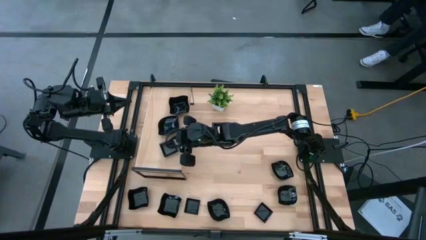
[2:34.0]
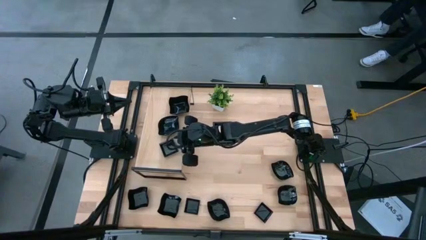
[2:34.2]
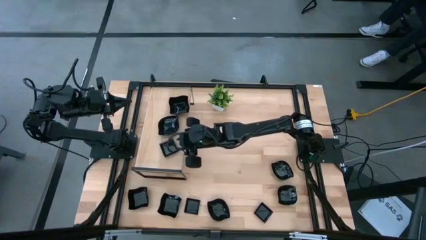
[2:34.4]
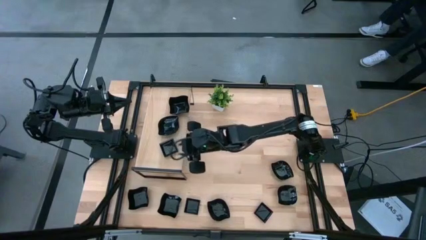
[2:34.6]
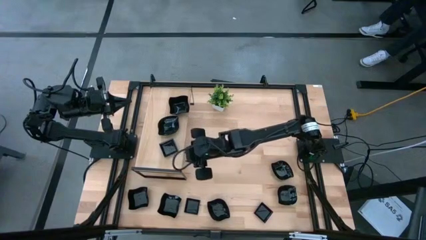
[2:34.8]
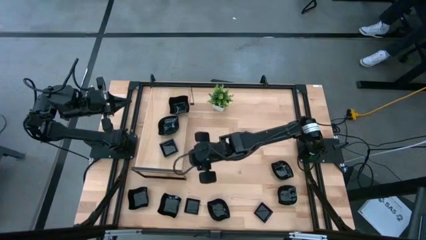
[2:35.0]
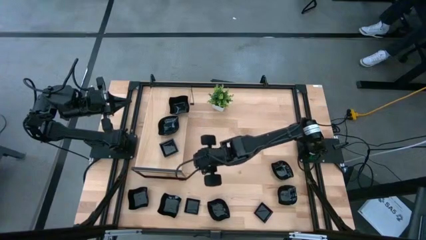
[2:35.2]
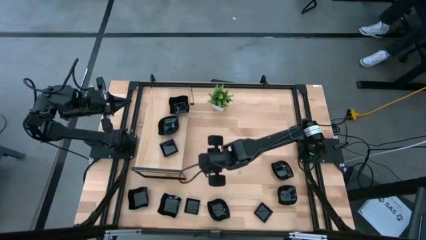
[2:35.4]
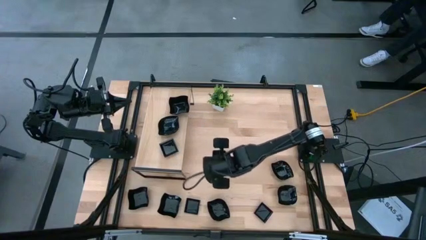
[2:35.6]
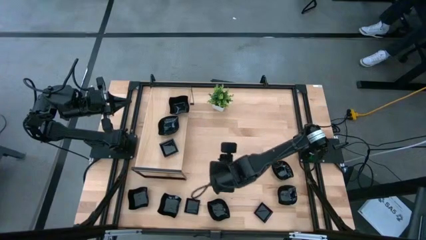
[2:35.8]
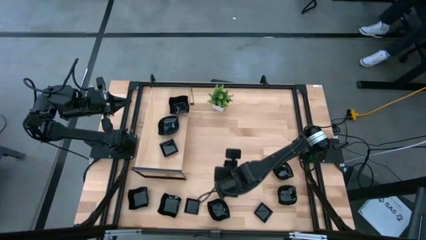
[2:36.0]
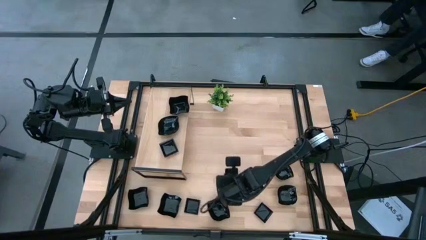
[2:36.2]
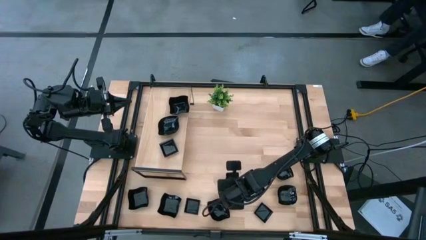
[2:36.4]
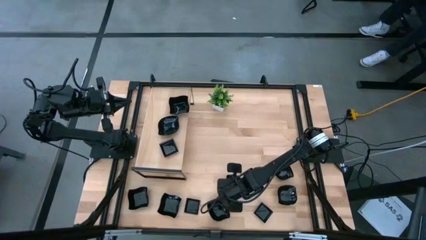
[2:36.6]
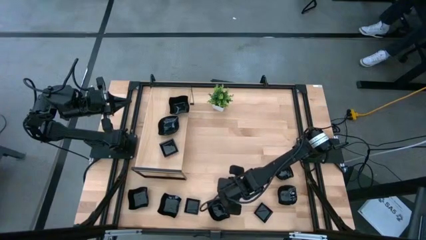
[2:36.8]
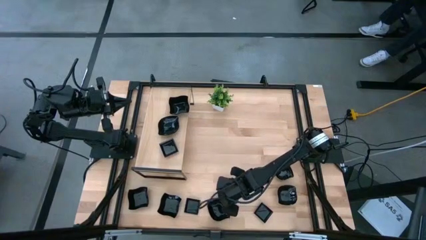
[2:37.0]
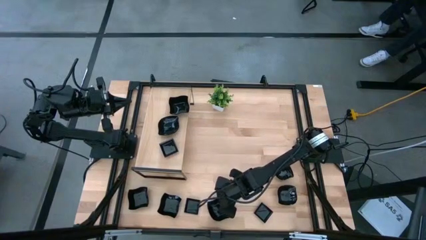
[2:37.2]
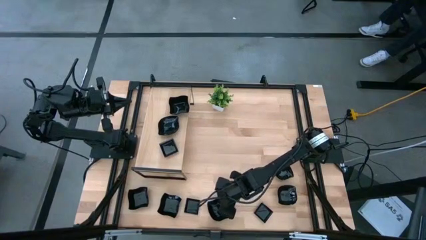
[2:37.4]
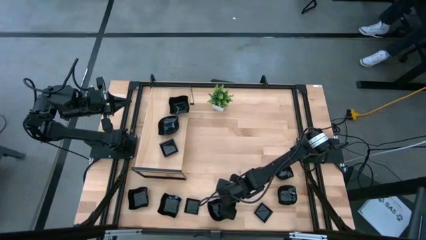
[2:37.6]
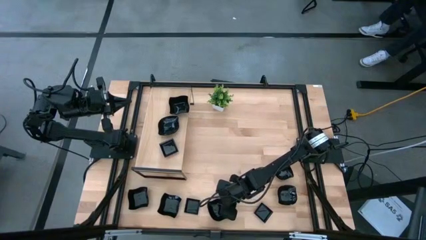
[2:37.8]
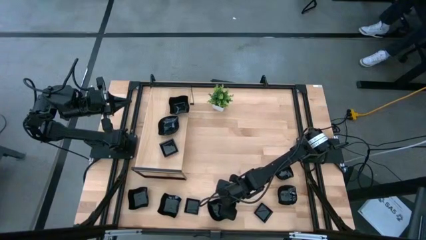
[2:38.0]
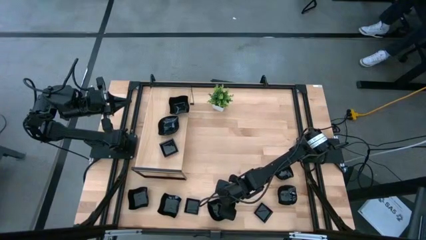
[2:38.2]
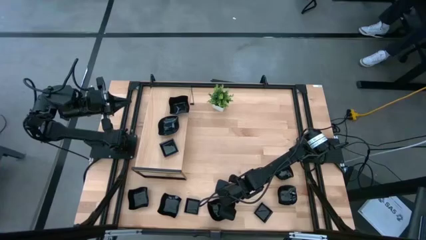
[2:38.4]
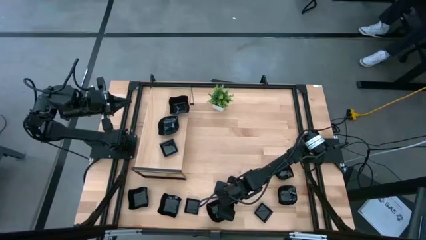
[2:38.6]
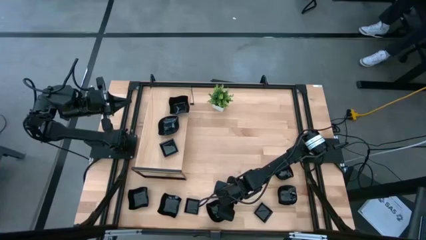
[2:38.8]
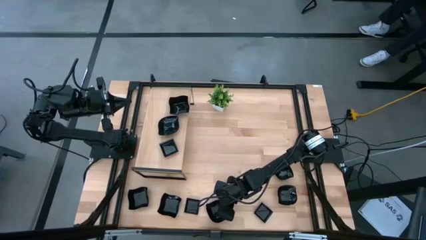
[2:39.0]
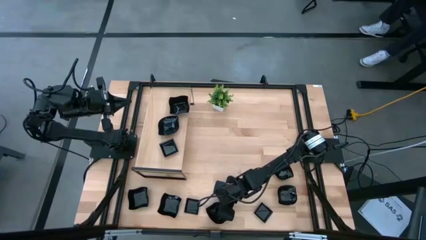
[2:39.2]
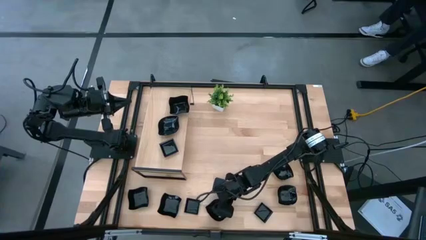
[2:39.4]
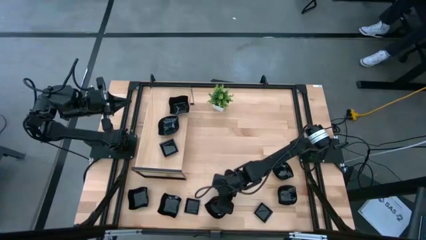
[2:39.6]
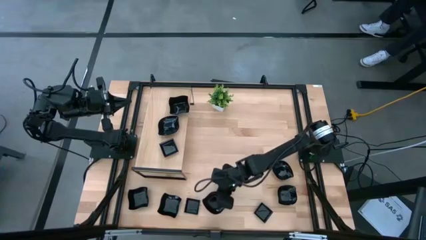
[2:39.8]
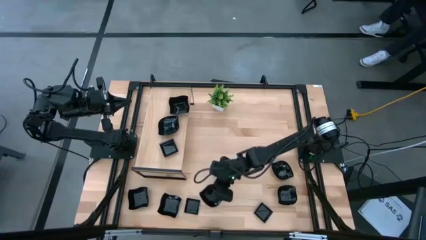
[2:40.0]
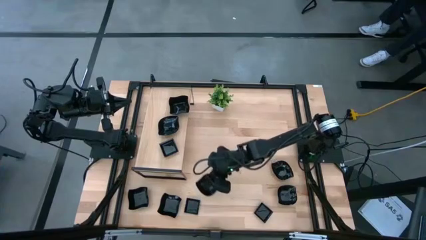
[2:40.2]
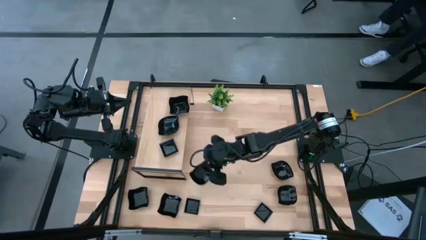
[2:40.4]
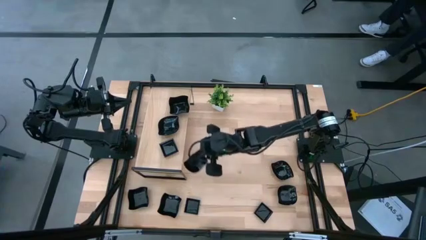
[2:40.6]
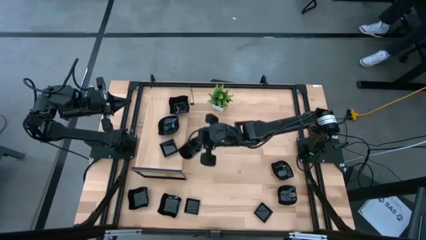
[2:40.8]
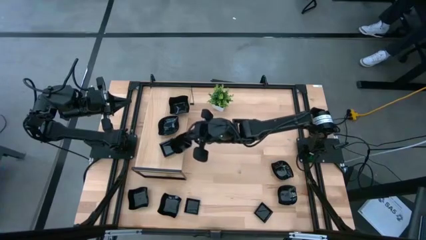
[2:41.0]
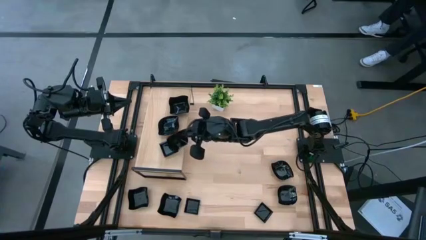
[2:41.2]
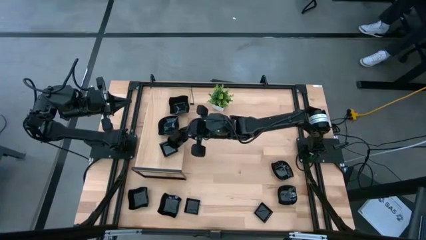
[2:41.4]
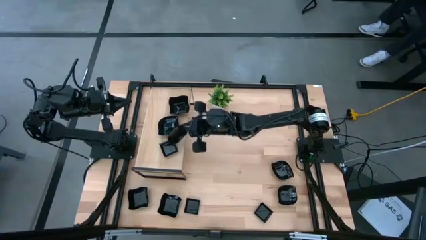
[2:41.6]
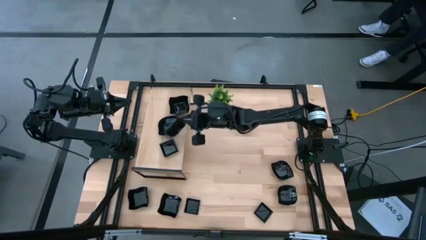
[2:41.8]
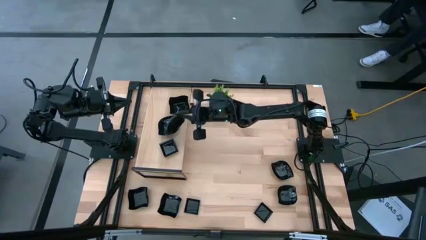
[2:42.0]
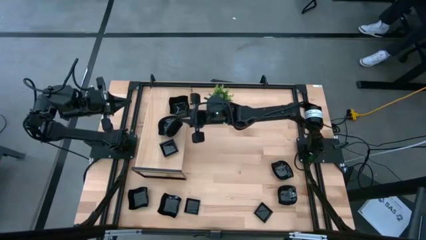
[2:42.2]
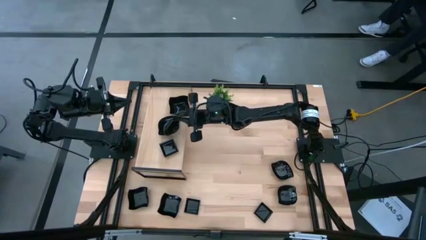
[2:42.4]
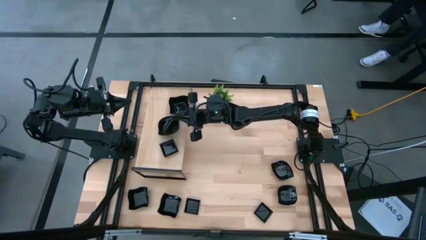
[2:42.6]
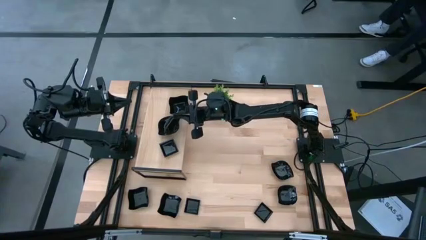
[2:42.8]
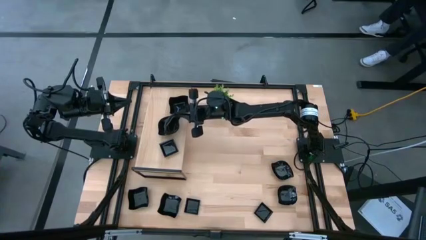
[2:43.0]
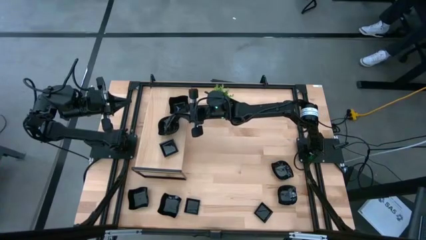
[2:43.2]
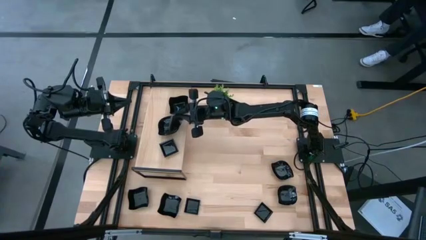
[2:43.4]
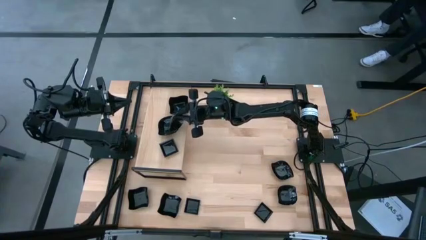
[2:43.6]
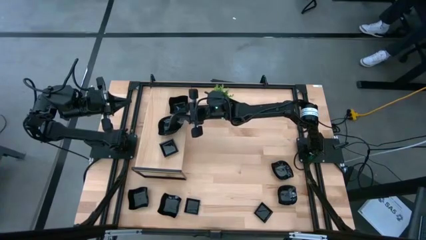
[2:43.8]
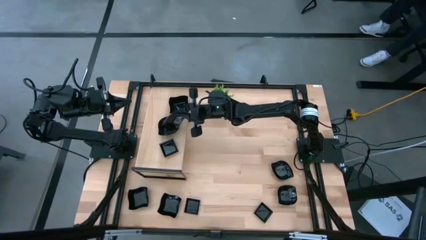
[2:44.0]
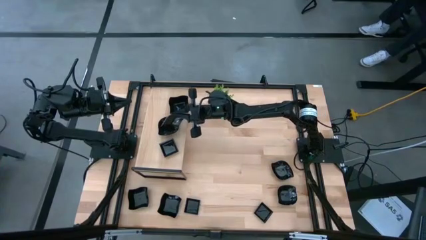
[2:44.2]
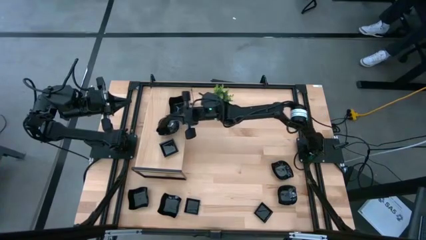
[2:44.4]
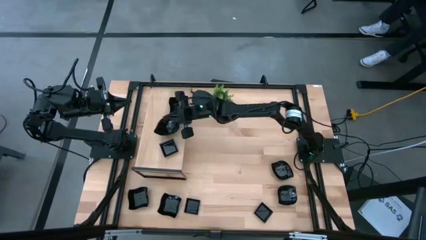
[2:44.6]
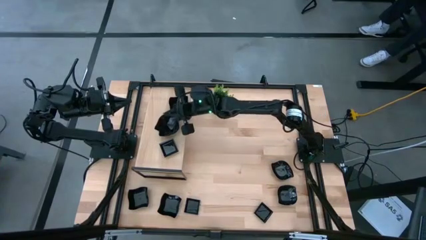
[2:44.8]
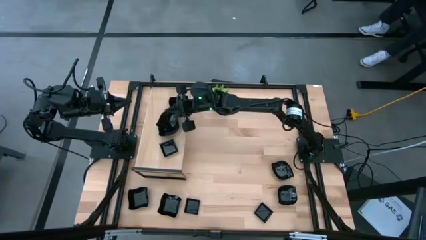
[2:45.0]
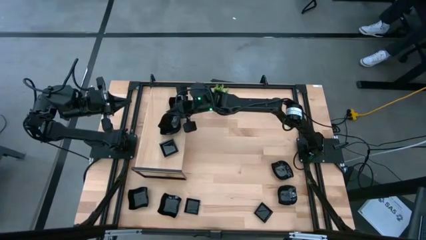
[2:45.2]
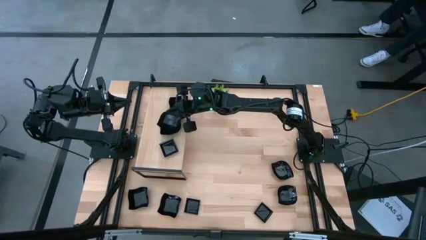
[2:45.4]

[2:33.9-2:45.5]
Task: Pick & Place Mini shaped plates
Stack the black leaf shape bowl on top of the black leaf shape bowl on the shelf

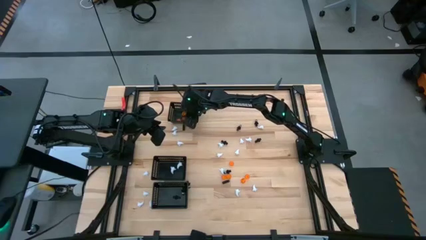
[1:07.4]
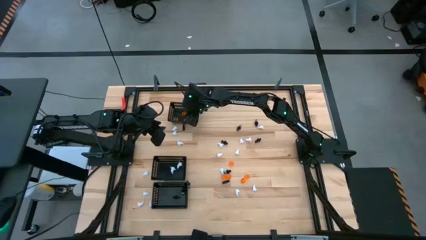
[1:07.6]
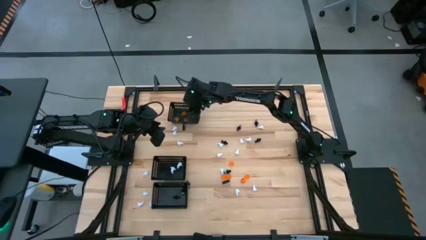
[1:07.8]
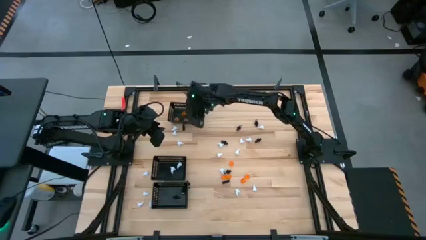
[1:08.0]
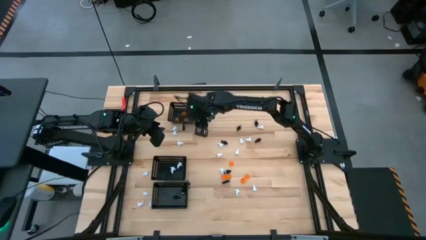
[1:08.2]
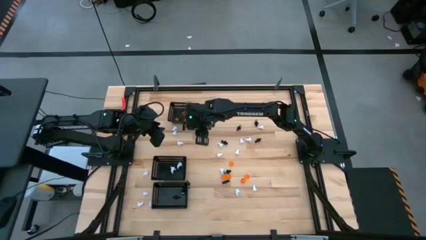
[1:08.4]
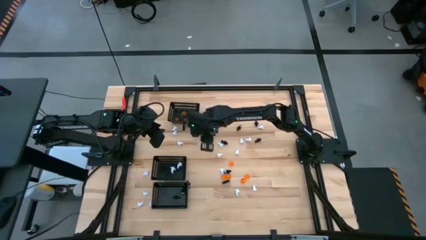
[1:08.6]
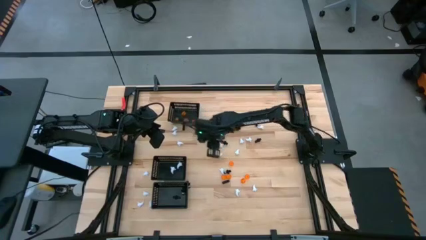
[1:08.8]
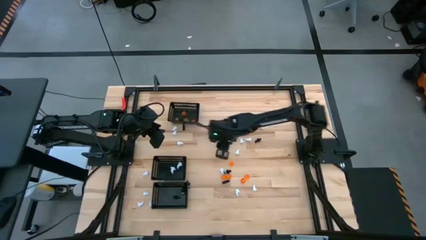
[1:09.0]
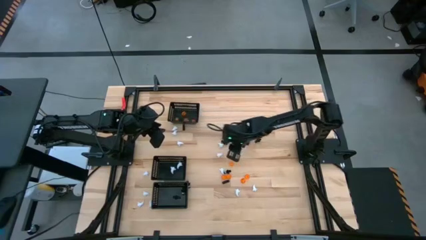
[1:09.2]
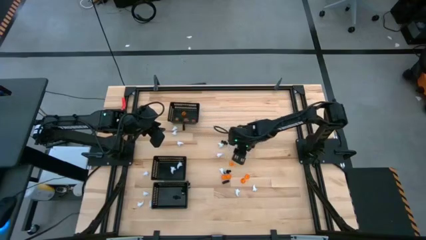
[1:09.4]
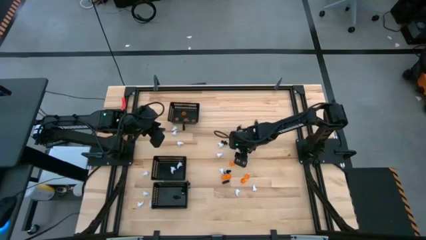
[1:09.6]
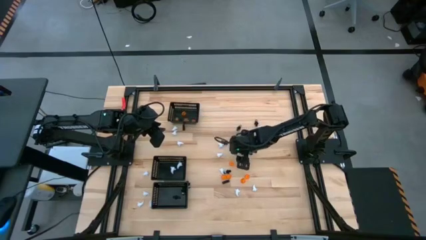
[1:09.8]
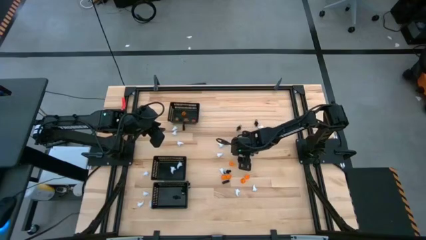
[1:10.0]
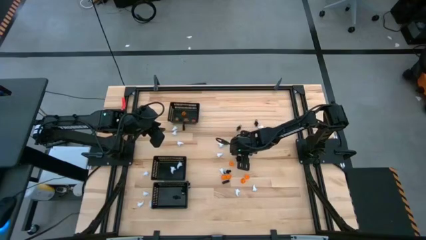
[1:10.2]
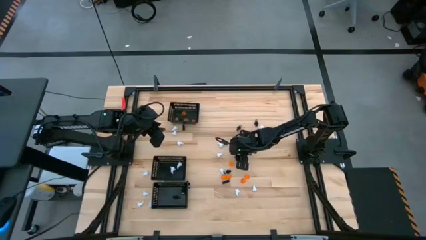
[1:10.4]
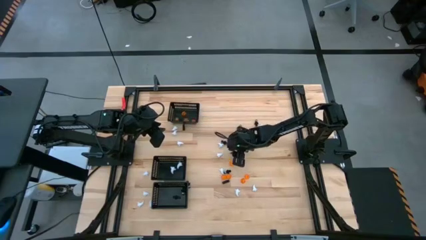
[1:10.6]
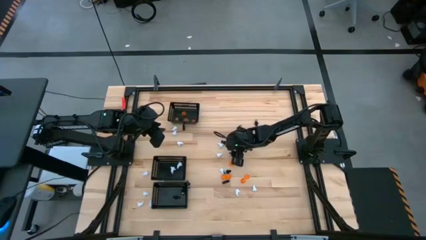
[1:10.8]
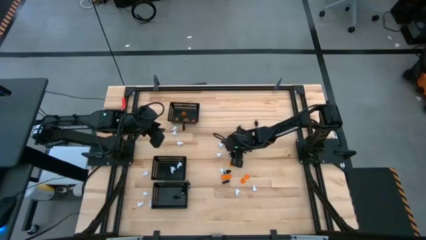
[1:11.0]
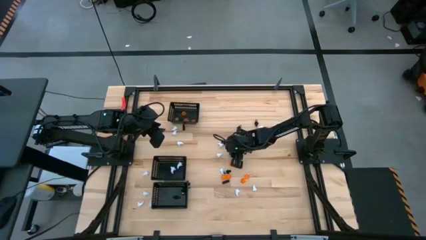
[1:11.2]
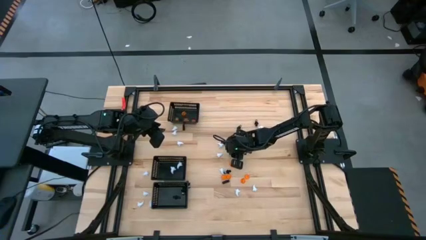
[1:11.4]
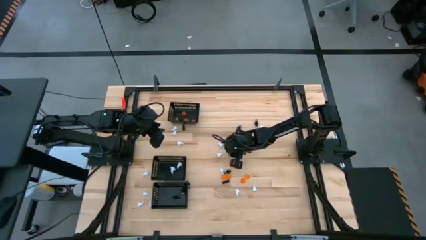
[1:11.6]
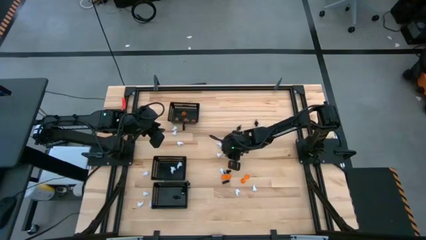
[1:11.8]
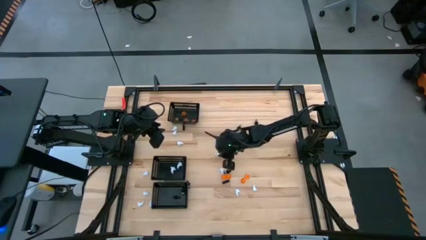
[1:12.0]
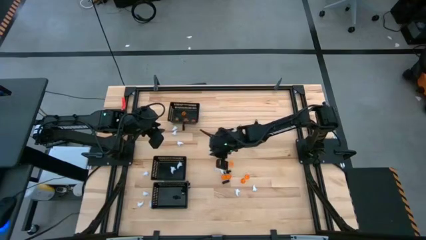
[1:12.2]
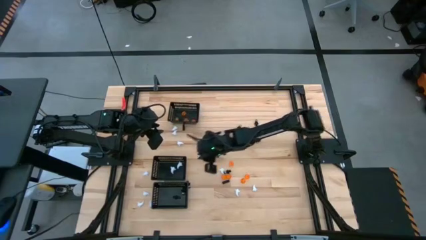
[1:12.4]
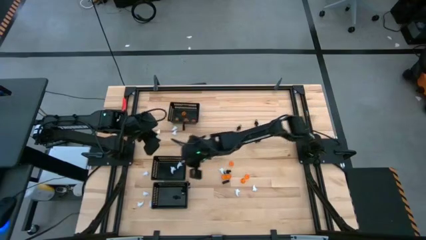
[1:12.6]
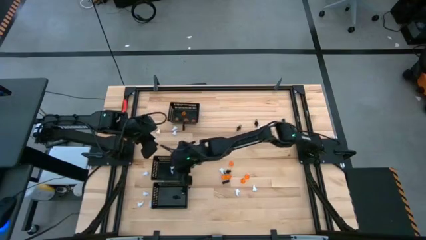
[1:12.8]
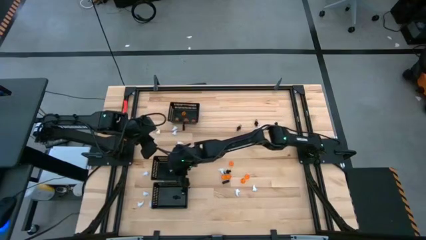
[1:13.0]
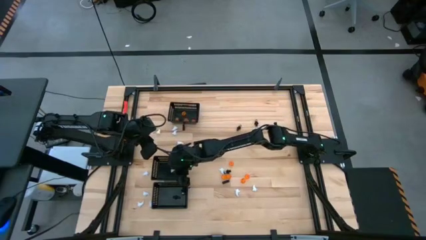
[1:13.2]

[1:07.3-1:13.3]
Task: Sort Halloween decoration
Put the white toy into the middle black bin
